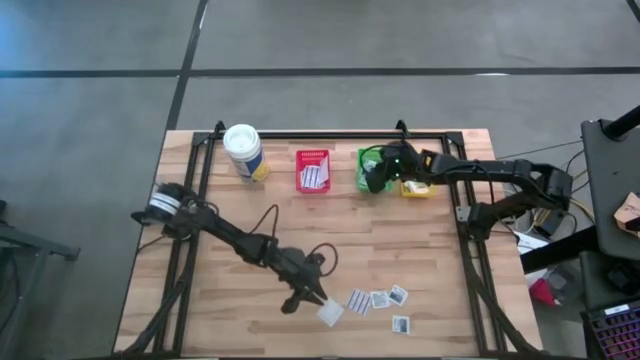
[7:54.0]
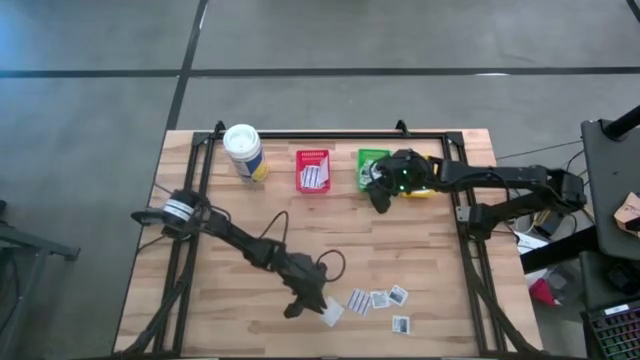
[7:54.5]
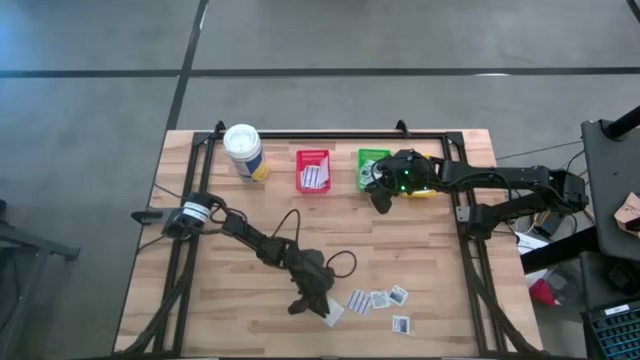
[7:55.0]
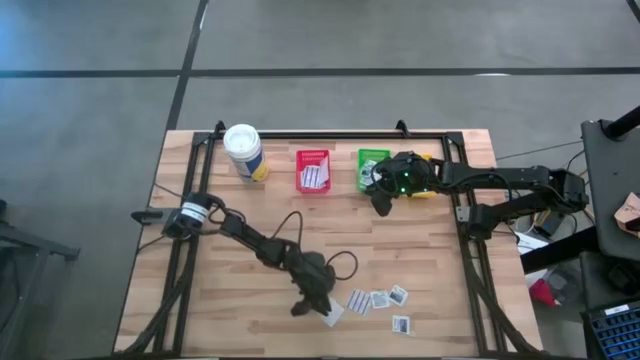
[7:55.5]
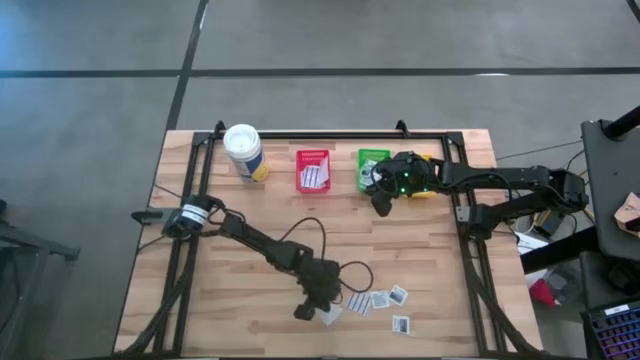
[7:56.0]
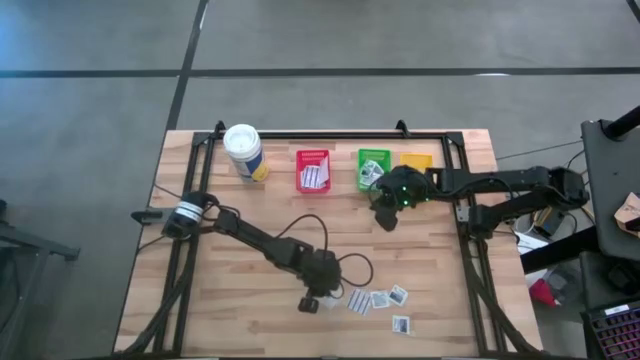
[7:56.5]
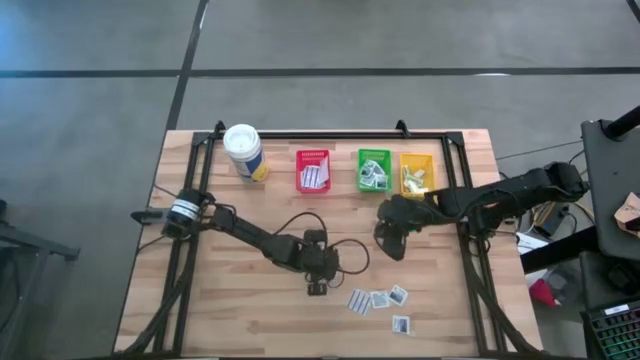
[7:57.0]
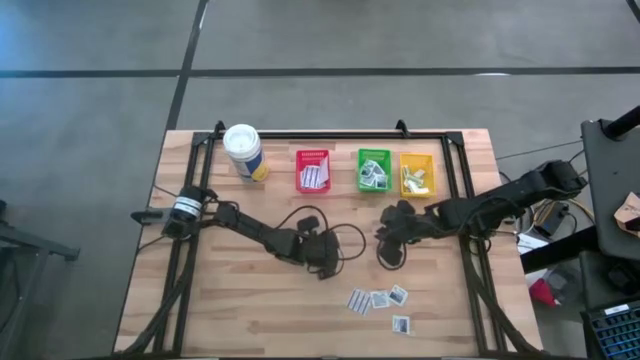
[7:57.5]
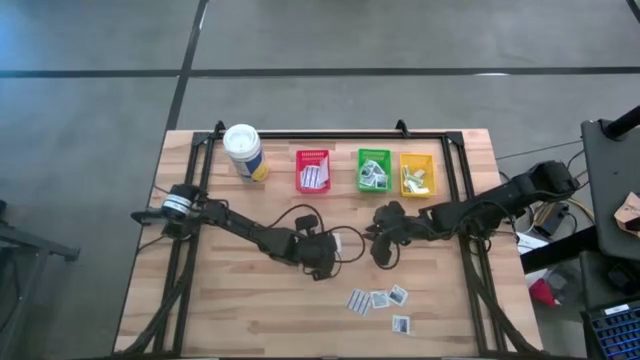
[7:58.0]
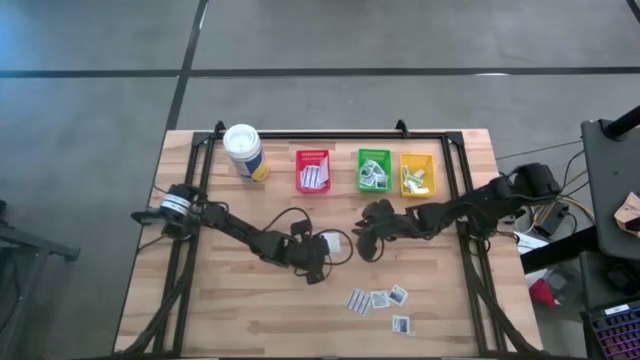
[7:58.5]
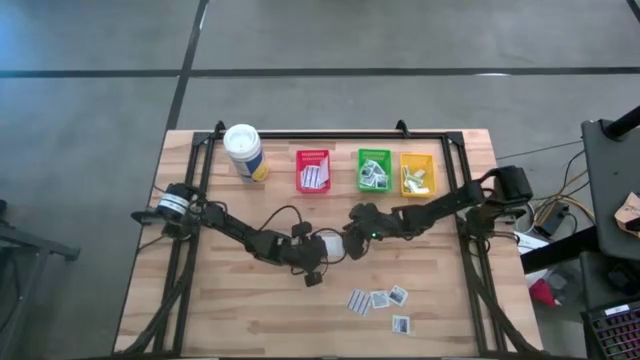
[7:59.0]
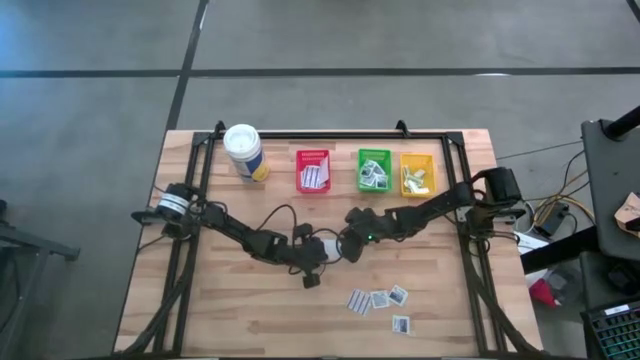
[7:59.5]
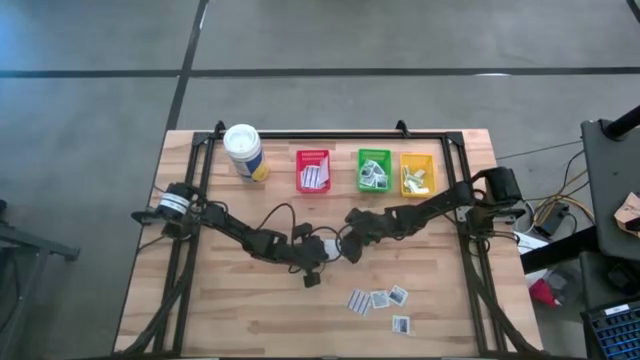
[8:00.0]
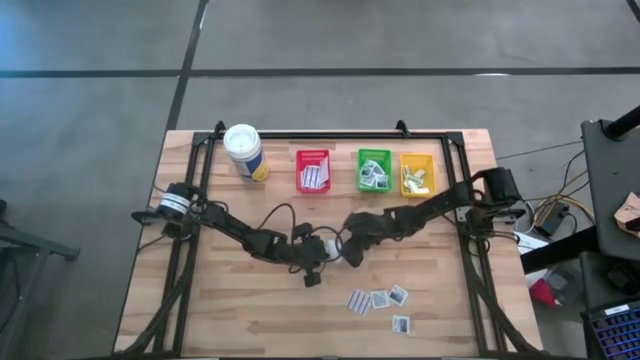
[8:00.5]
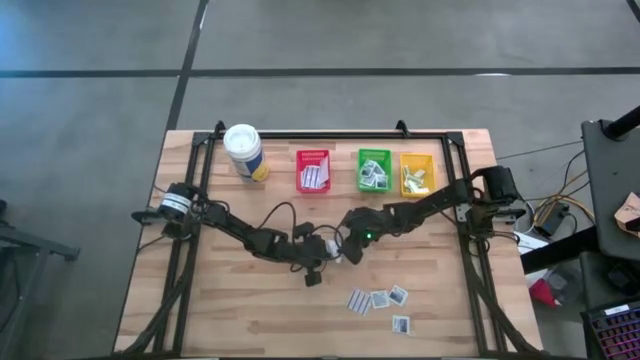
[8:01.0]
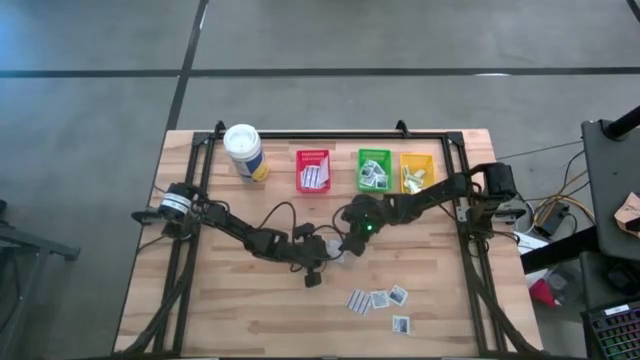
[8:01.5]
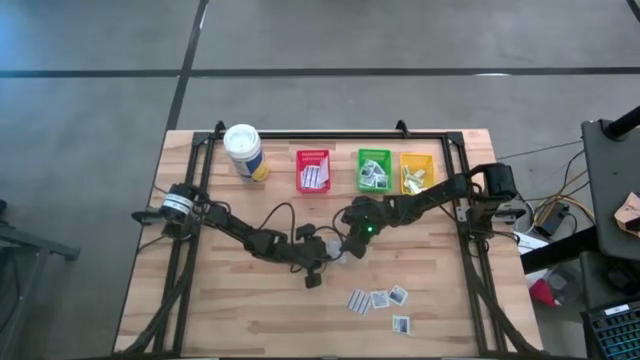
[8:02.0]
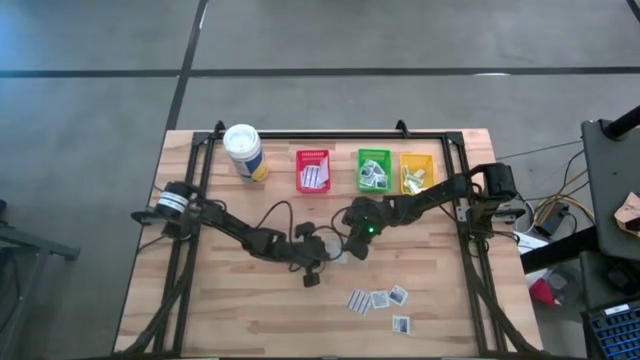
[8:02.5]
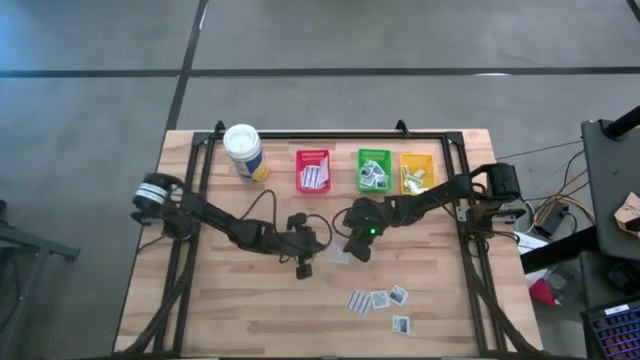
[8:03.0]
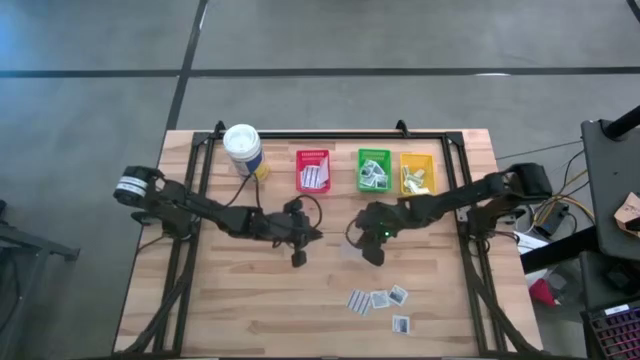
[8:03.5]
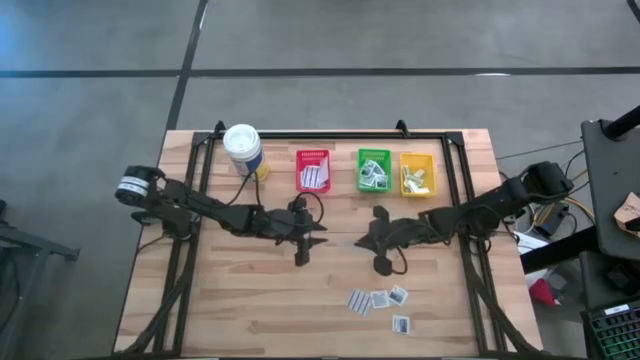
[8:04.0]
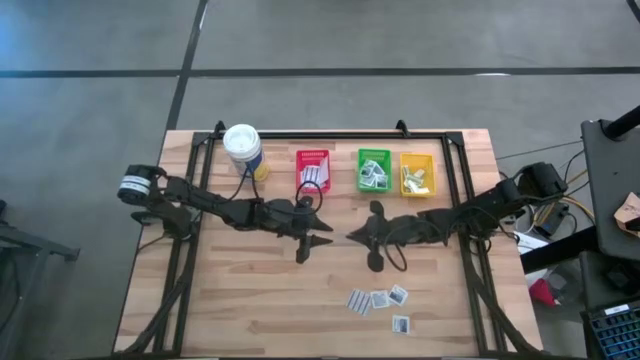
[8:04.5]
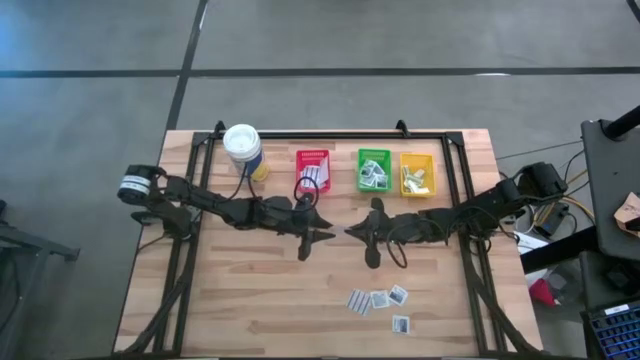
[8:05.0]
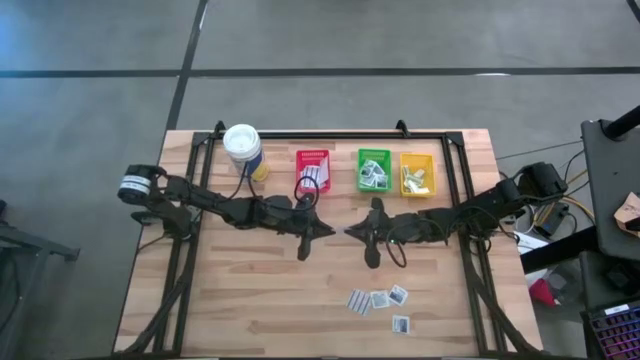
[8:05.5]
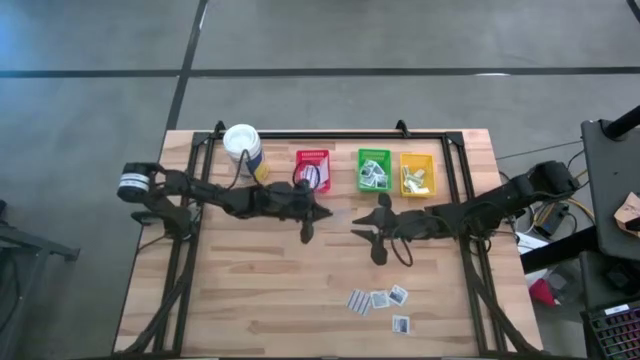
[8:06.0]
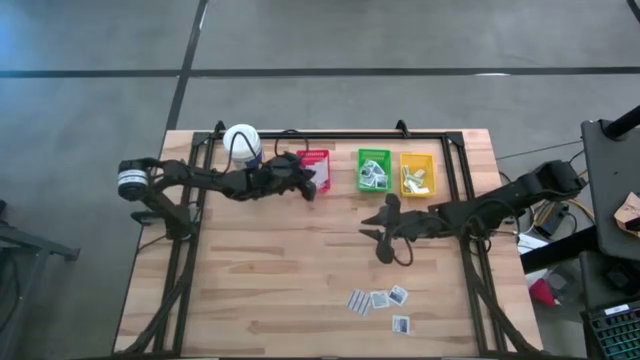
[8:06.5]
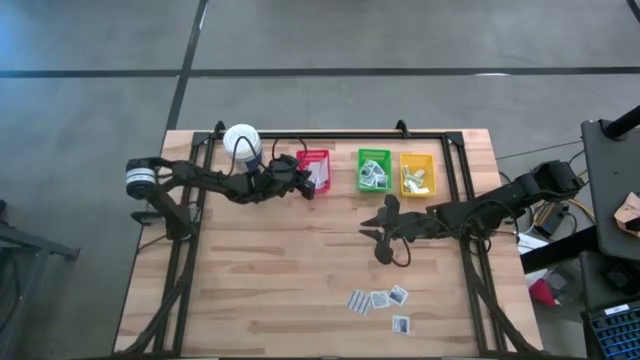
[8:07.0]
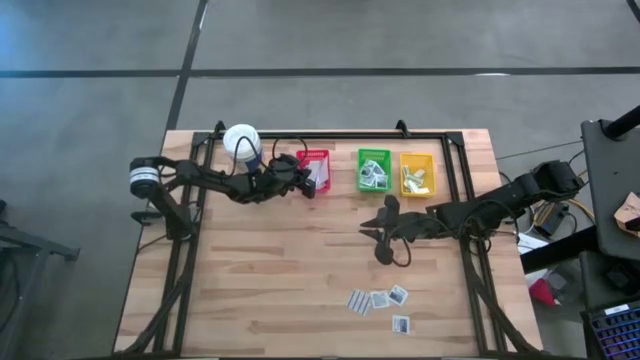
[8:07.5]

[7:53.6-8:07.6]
Task: Pick & Place First Aid Supplies
Put the blue bandage in the red bin

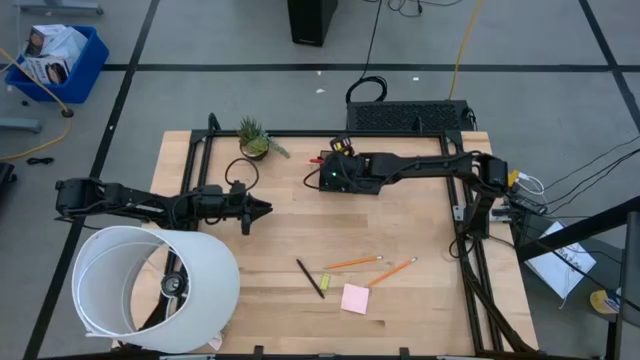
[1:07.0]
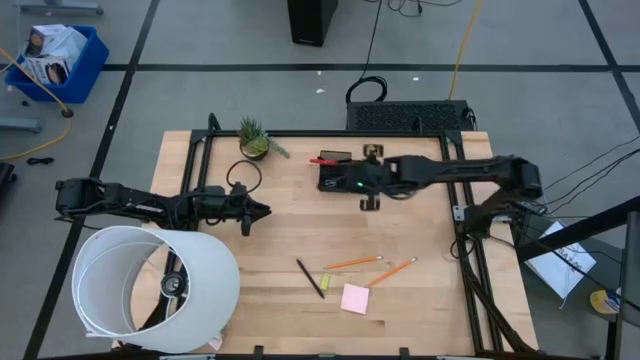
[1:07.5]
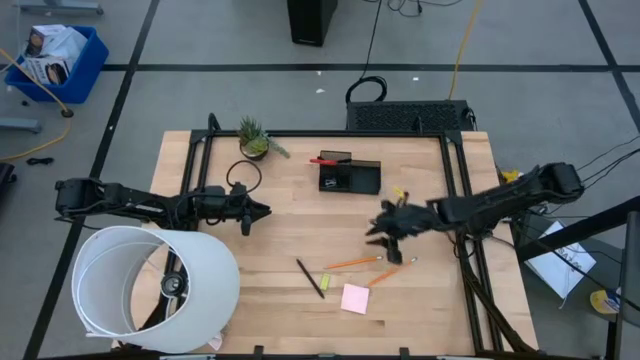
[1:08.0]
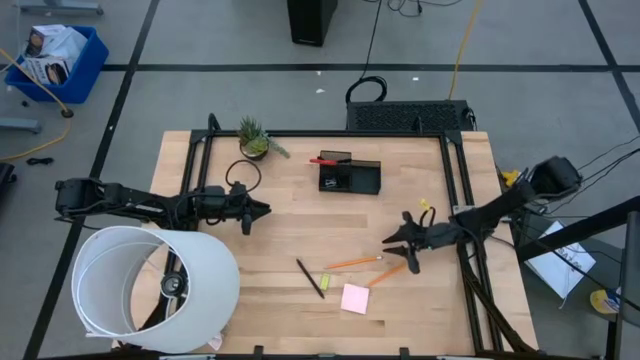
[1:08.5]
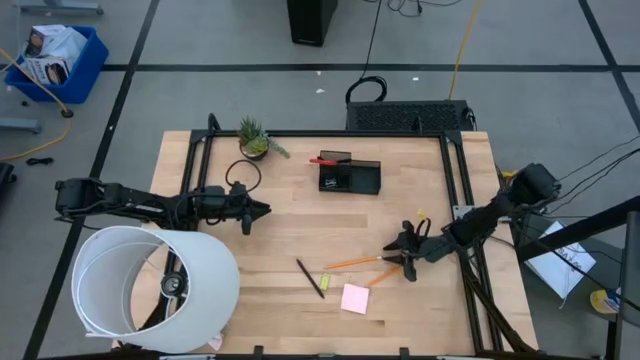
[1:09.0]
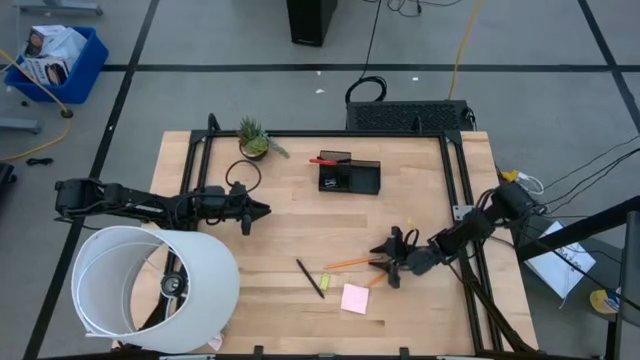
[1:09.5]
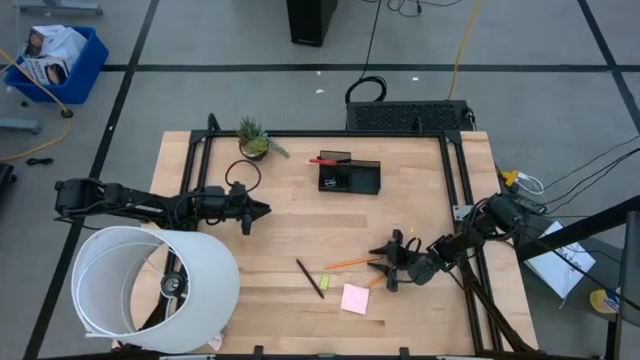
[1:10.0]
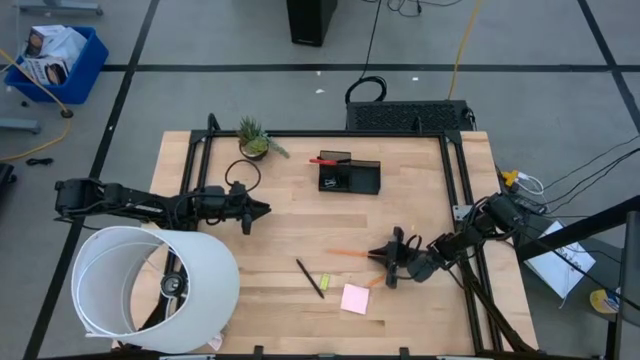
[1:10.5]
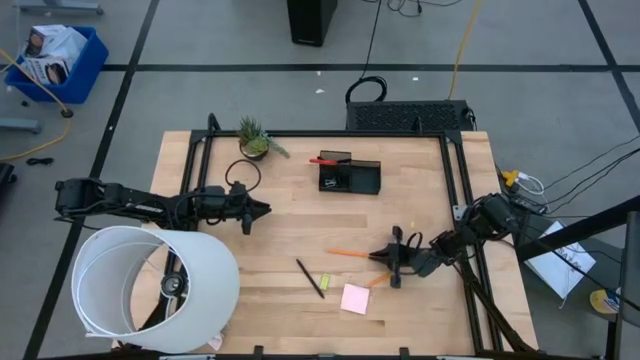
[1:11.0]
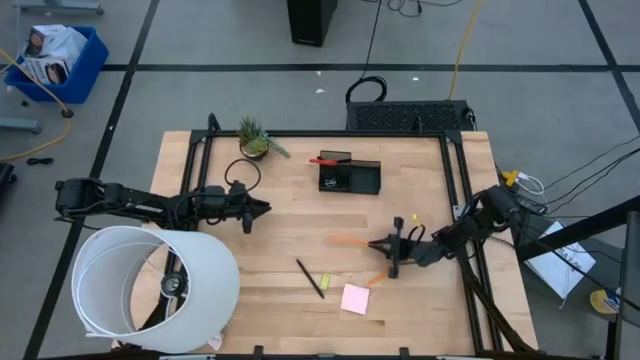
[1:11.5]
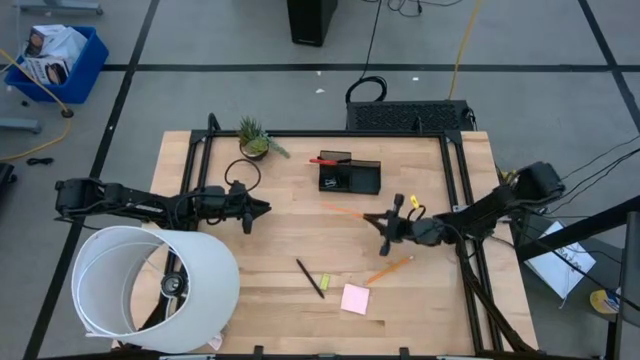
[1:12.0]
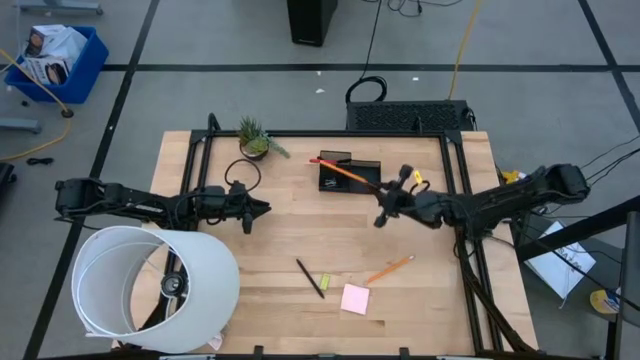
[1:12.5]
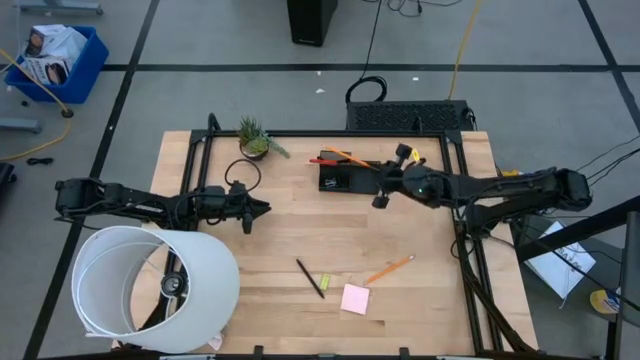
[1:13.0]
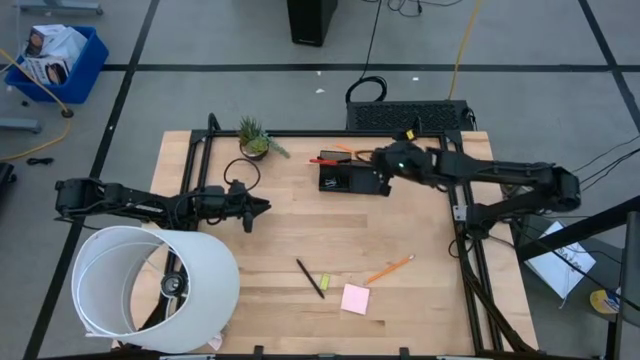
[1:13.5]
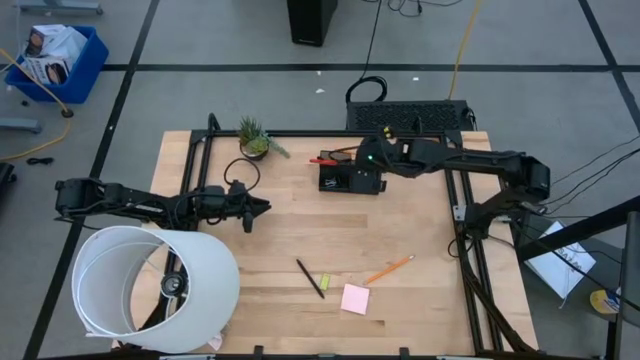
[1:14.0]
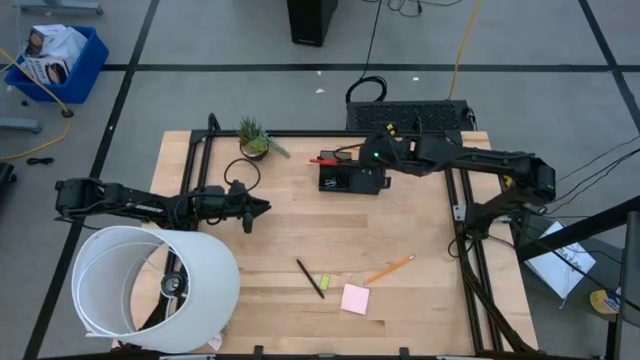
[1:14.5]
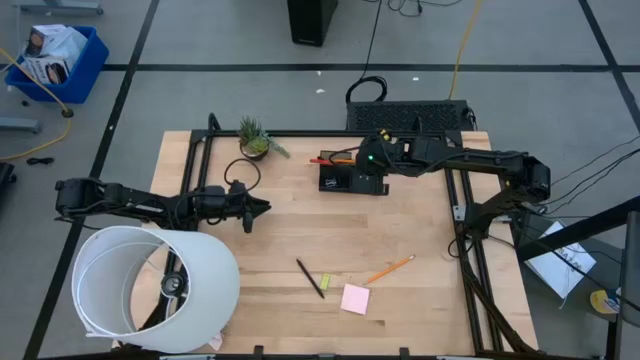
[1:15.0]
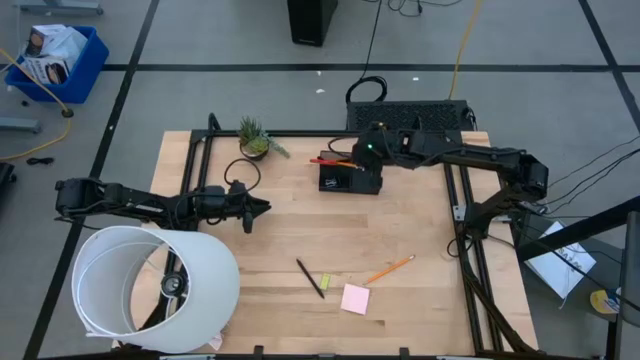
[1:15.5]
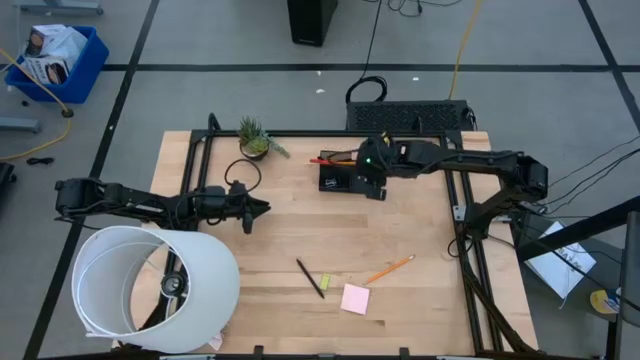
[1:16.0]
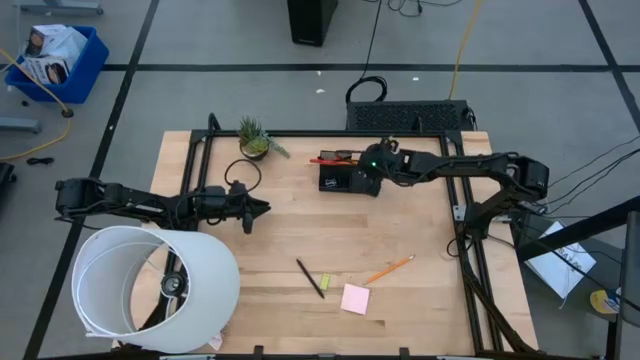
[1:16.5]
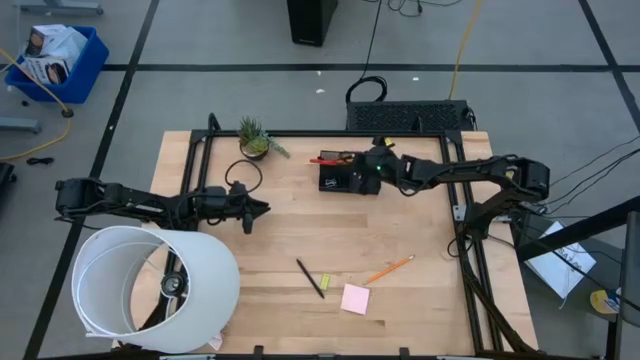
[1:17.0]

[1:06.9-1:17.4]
Task: Pick and place office supplies into organizer
Put the orange pencil into the desk organizer
